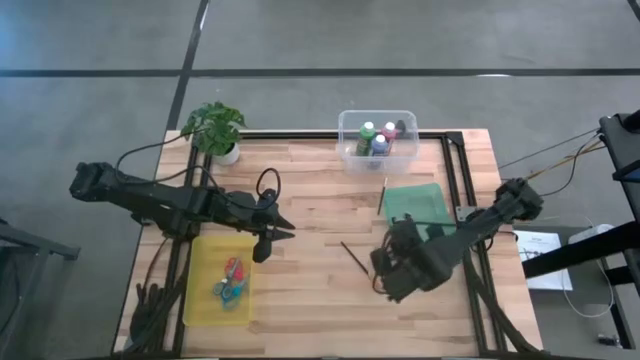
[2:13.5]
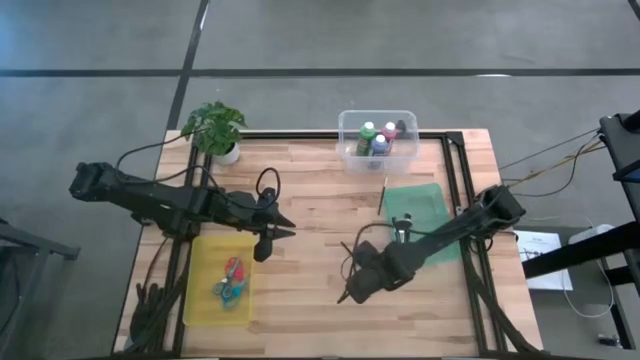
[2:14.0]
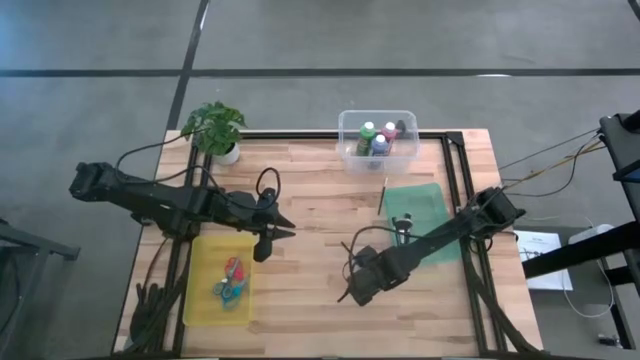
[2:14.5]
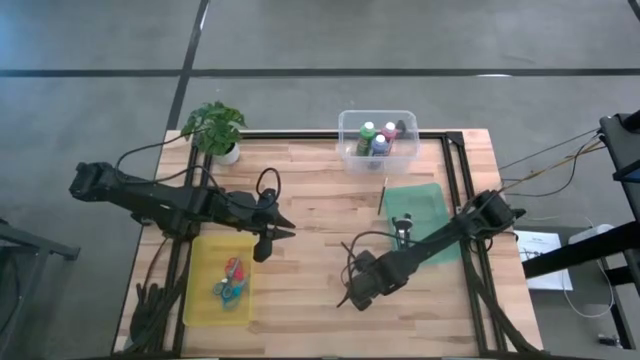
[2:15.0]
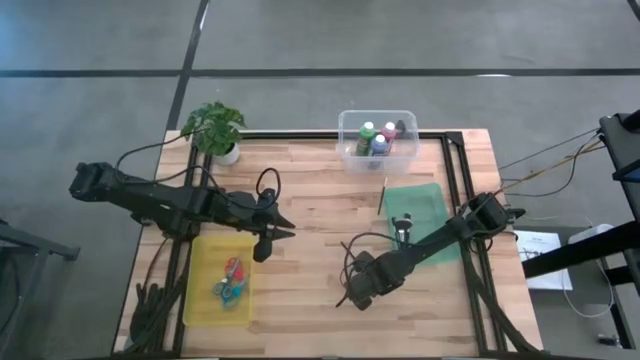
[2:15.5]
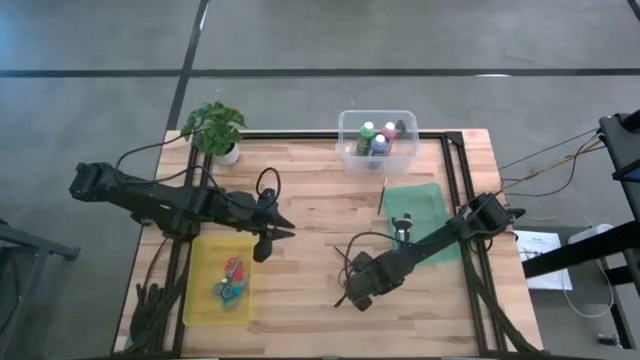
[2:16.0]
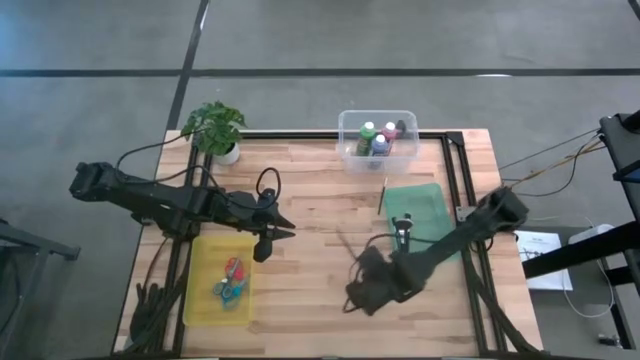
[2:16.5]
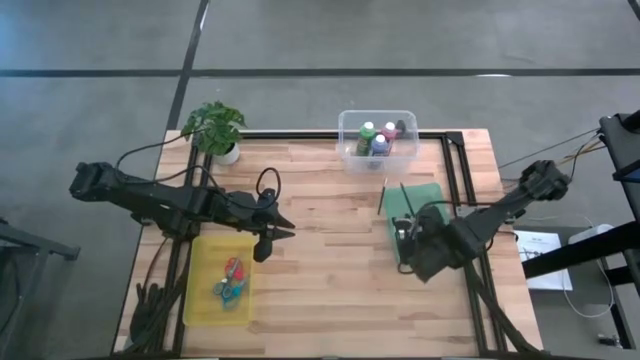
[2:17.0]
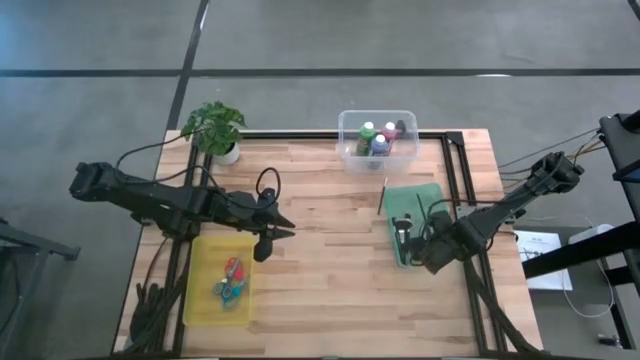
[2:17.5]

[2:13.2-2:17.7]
Task: Pick & Place Paint Supplies
Put the black paint brush into the green bin

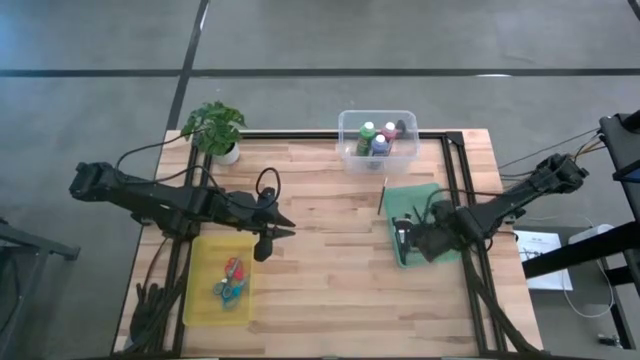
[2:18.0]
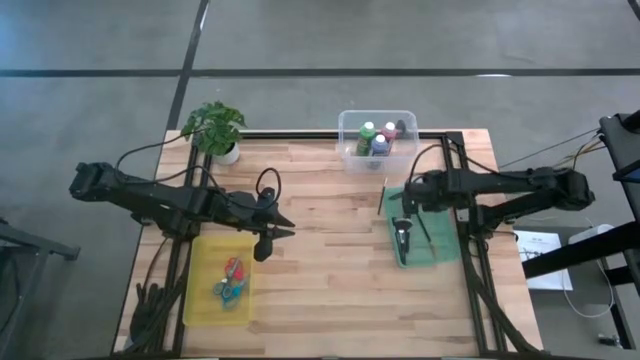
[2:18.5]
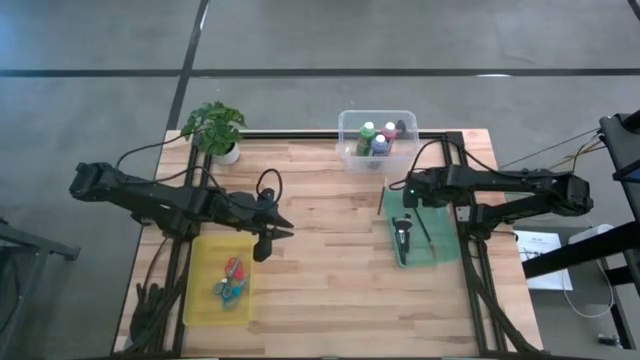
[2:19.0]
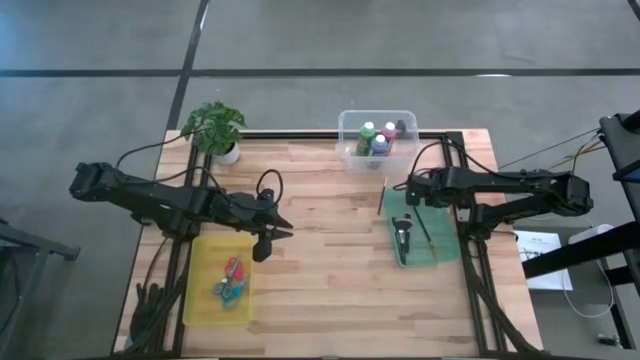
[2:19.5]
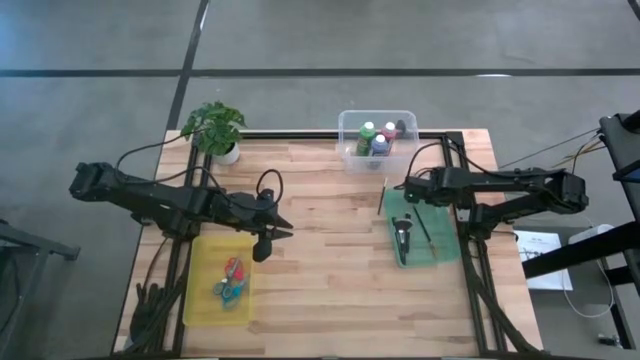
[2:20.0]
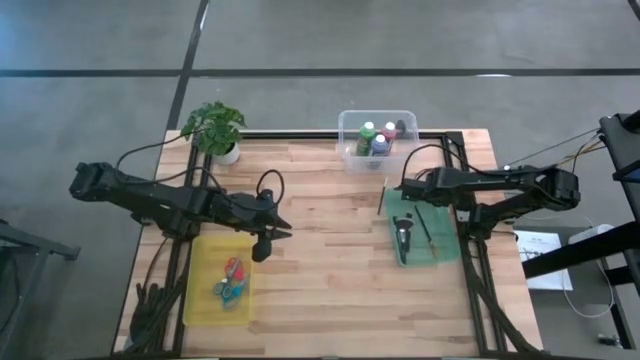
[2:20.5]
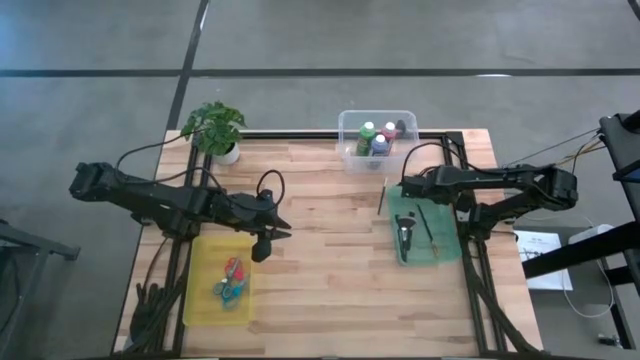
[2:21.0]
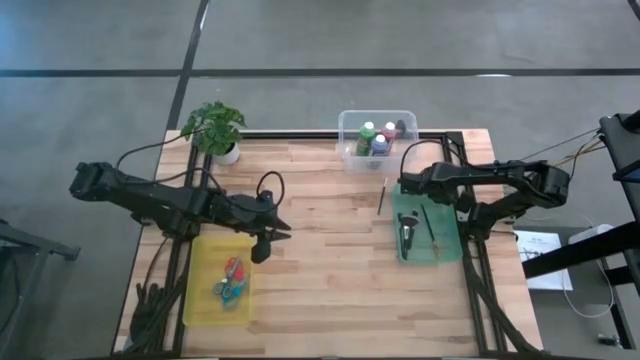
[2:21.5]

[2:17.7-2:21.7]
Adjust the green bin

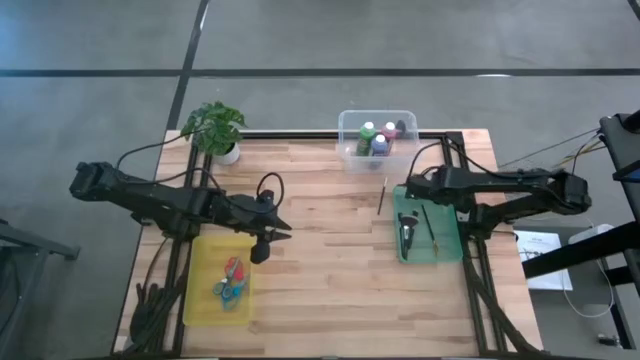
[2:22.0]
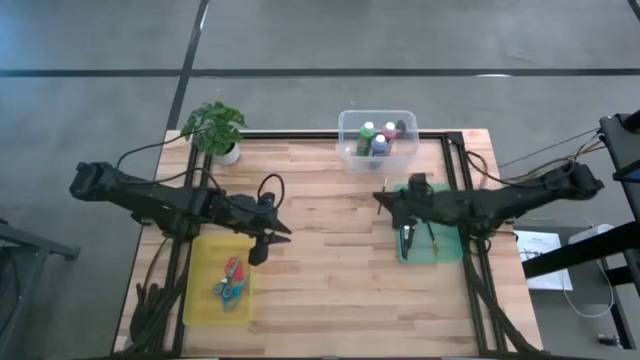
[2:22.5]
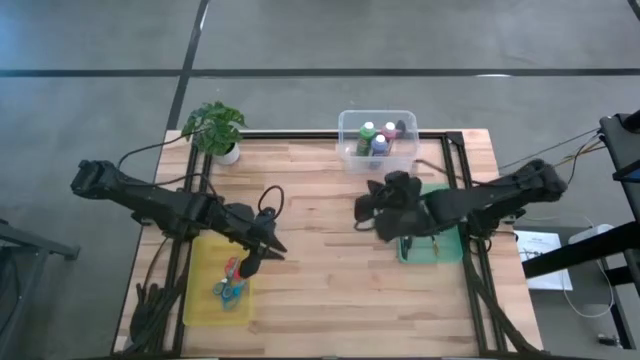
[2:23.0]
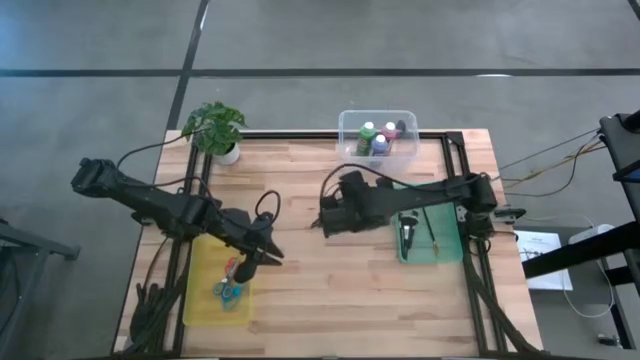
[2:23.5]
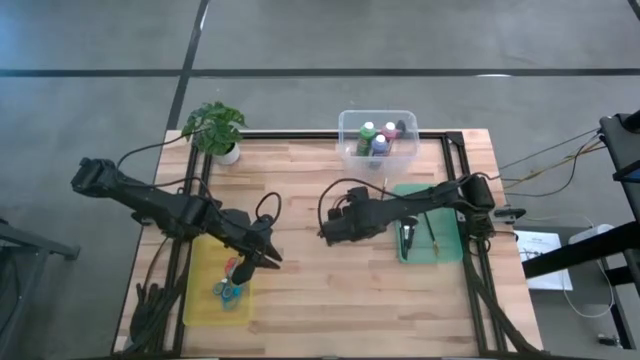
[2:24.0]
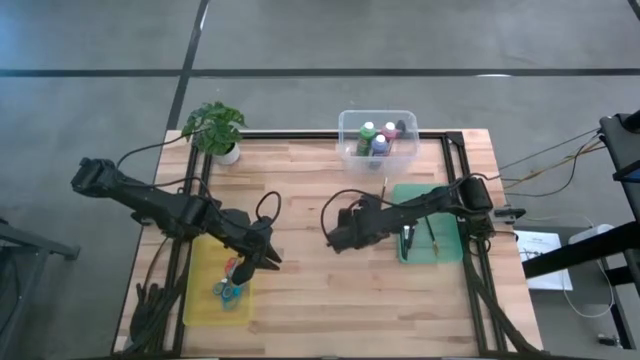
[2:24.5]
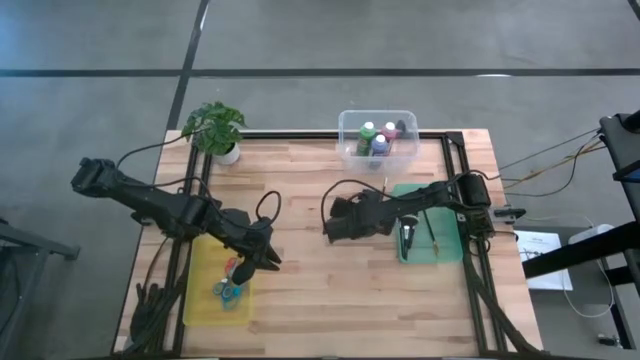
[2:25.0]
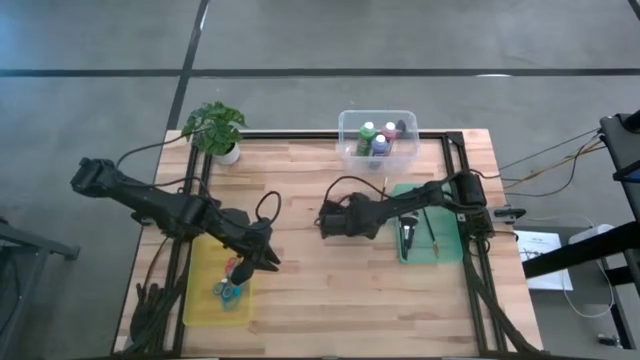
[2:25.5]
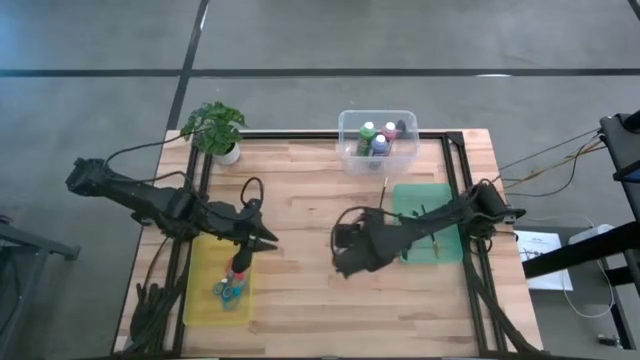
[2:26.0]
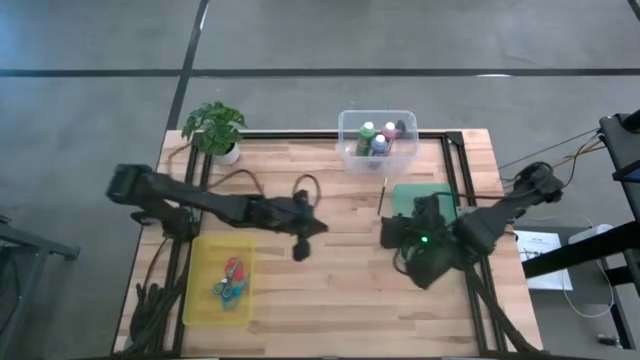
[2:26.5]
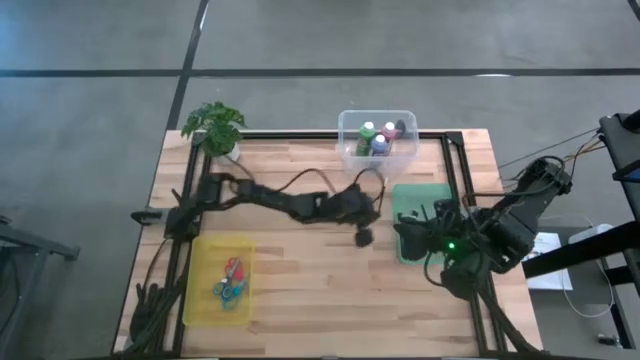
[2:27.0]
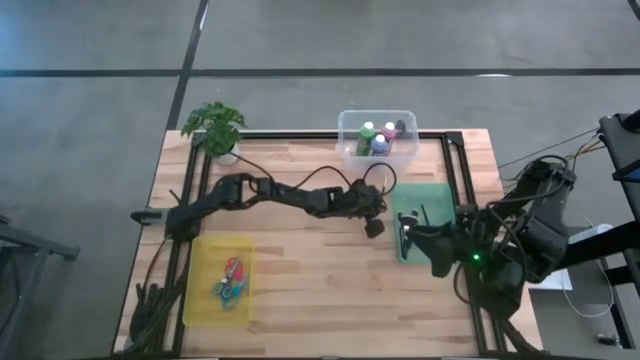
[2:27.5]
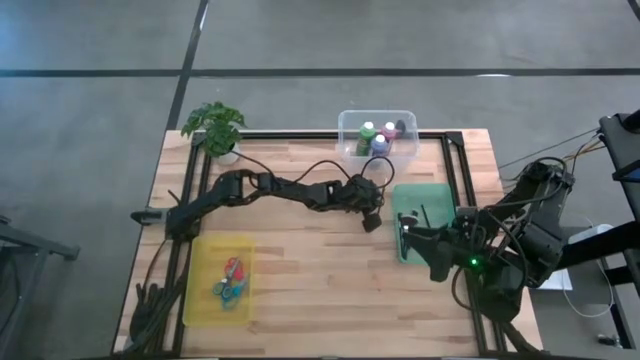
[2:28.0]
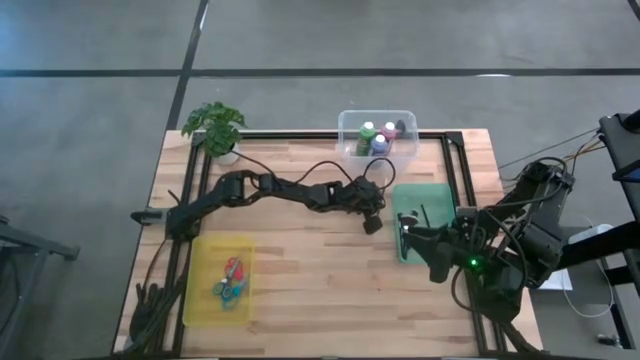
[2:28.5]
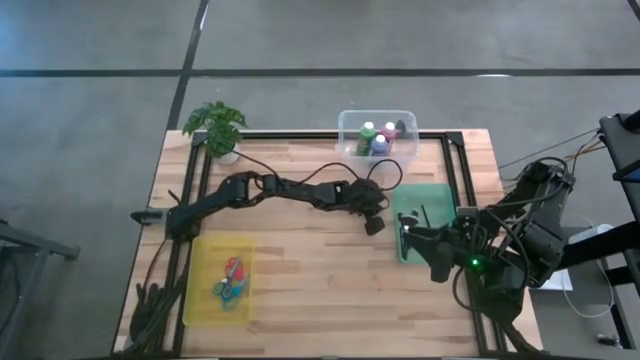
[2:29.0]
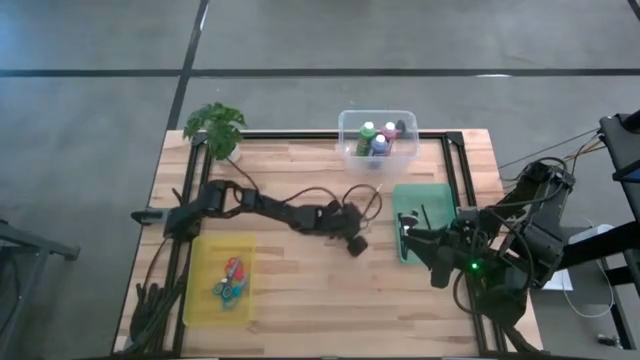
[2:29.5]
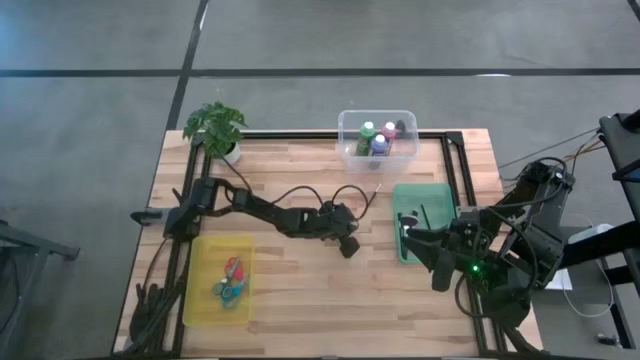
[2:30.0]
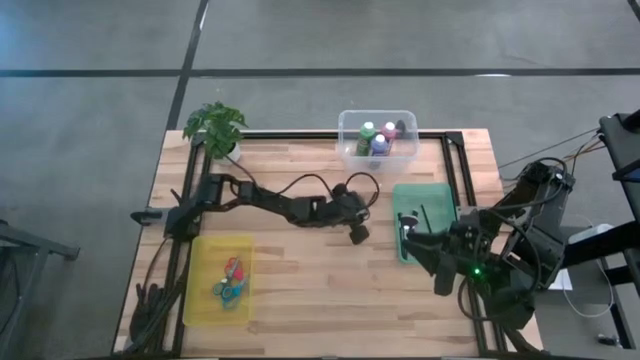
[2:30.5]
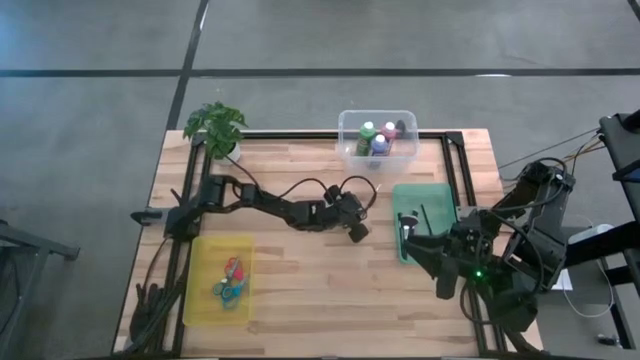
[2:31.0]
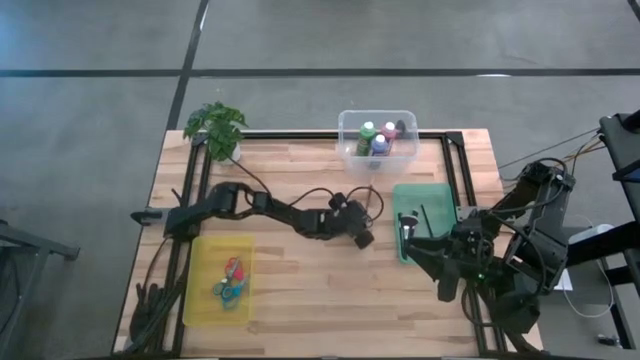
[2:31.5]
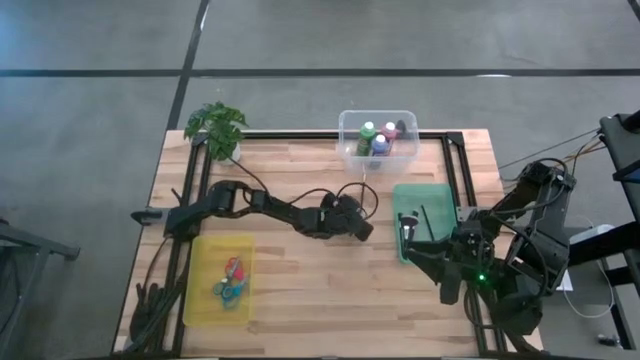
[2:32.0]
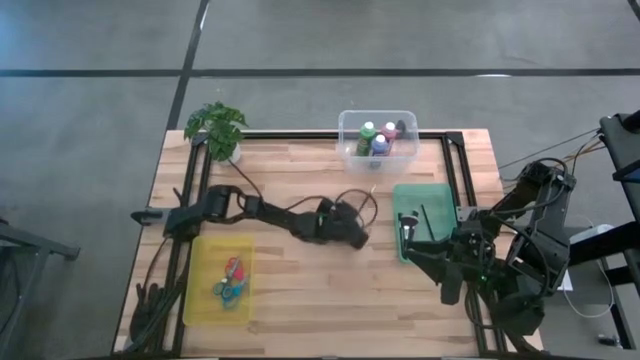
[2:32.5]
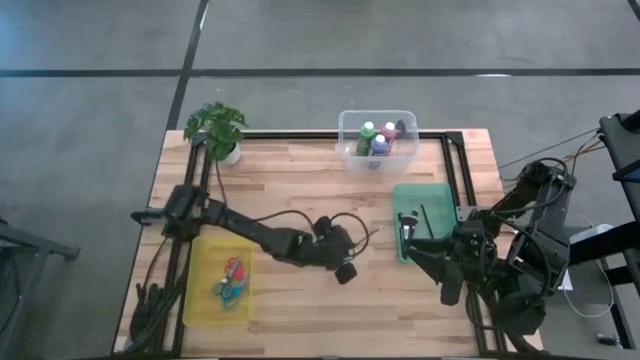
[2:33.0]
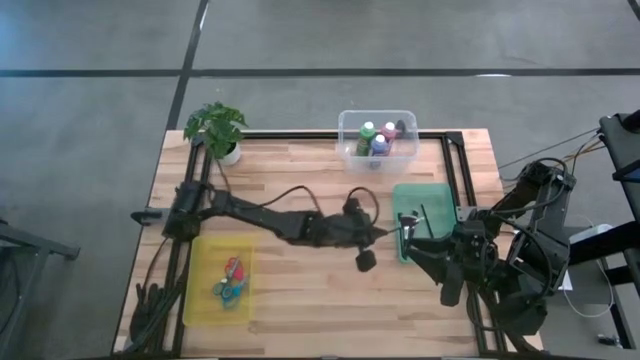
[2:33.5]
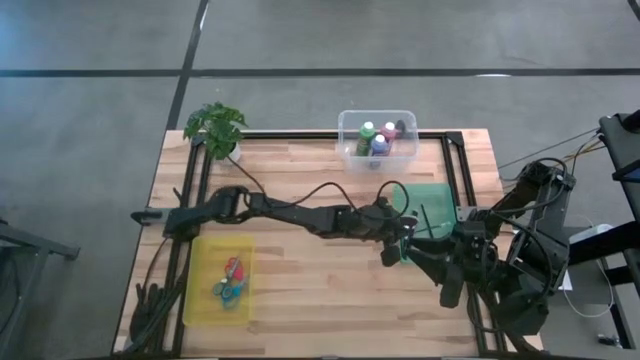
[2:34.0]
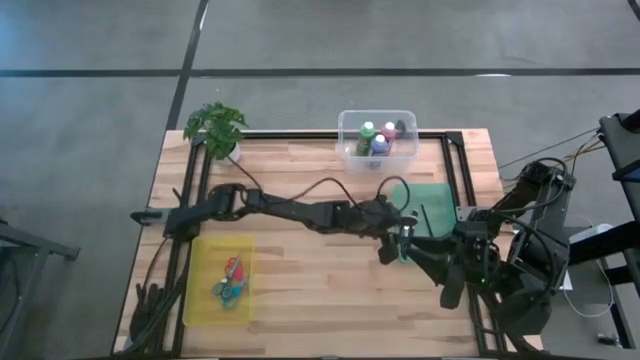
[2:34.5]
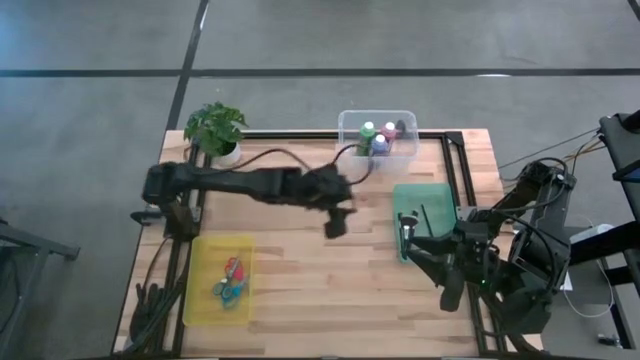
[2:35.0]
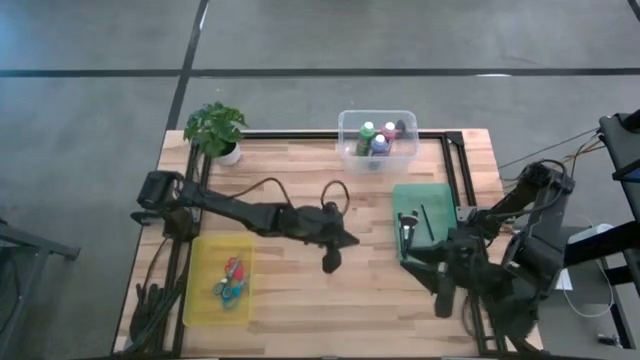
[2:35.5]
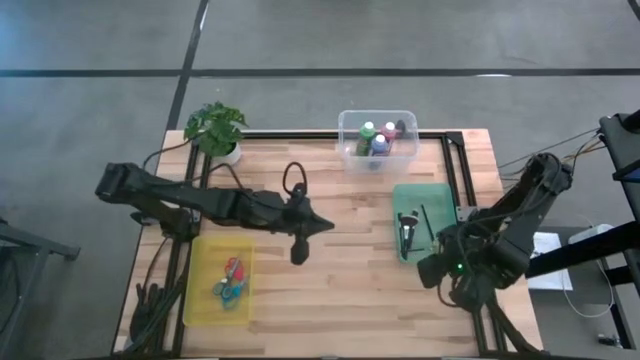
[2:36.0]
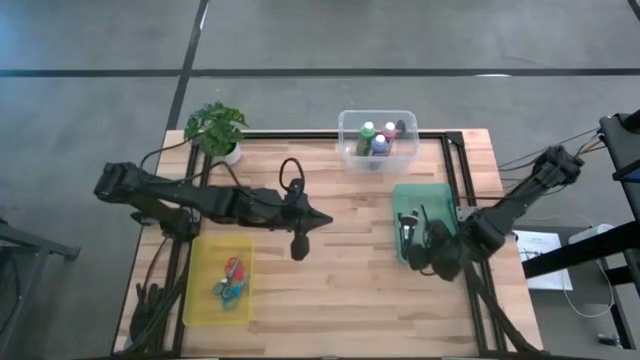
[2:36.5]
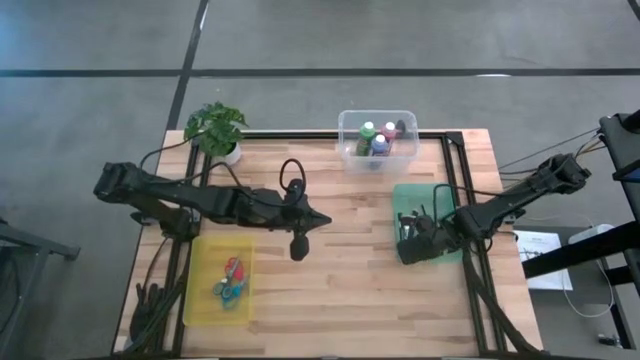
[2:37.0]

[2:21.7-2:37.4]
Put the black eyeshadow brush into the green bin
